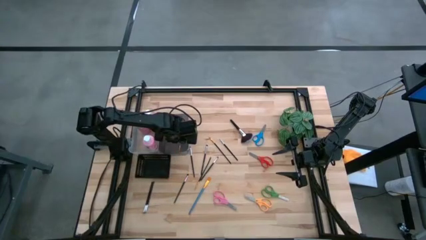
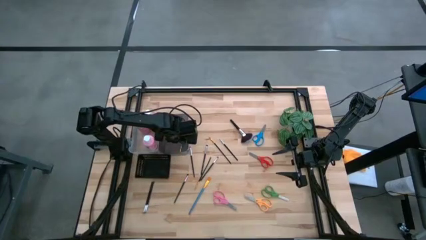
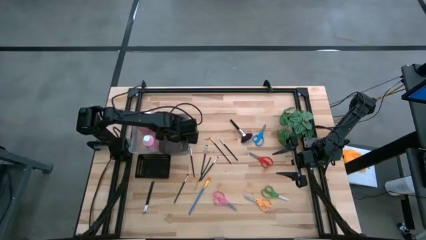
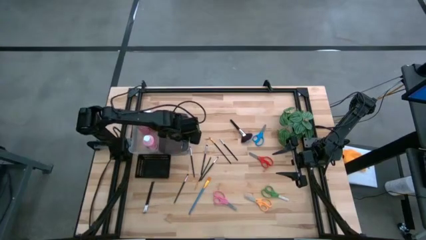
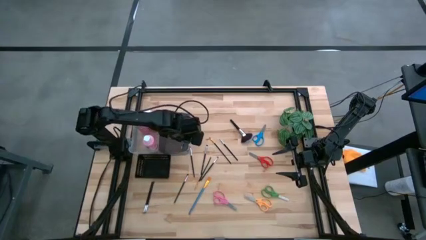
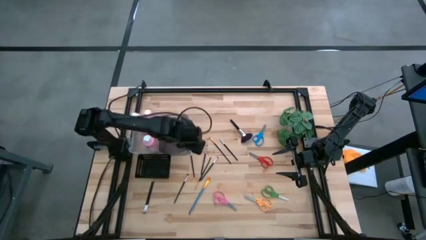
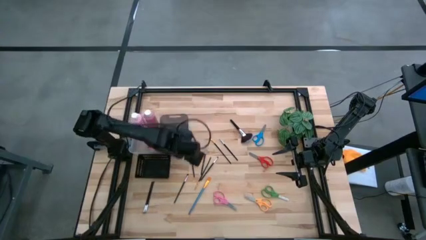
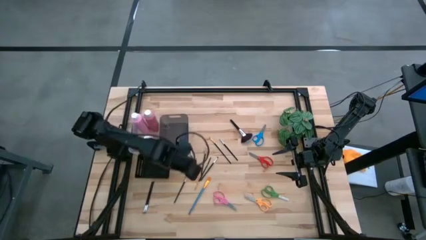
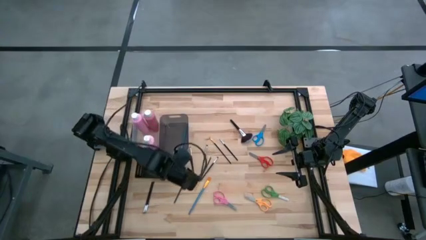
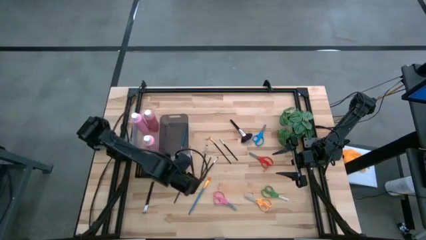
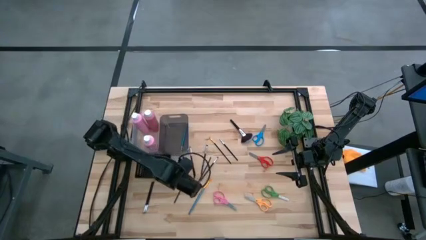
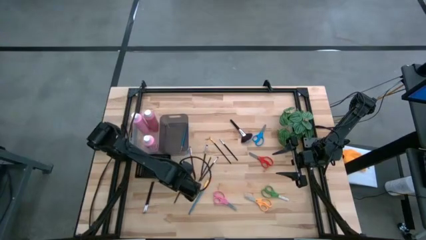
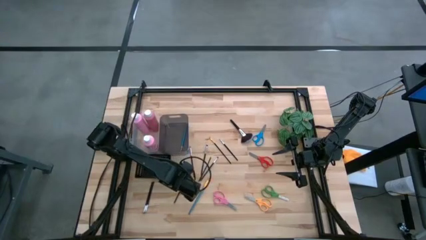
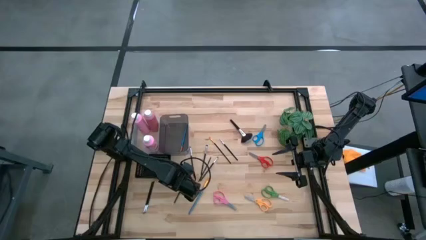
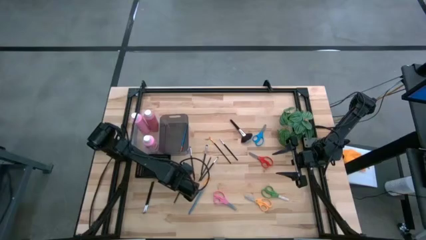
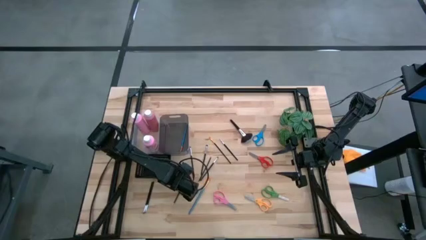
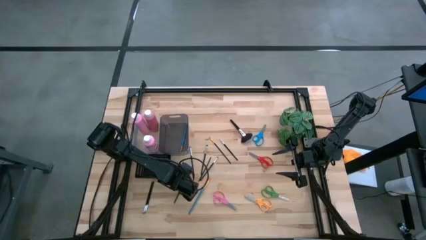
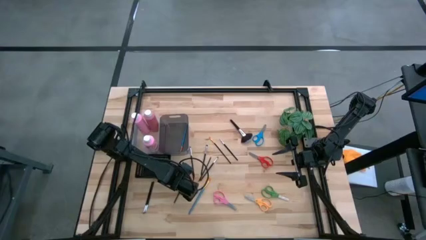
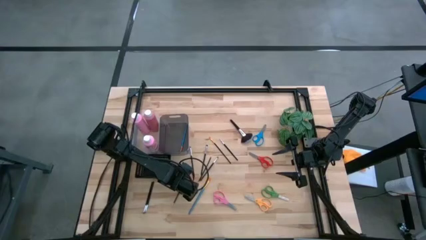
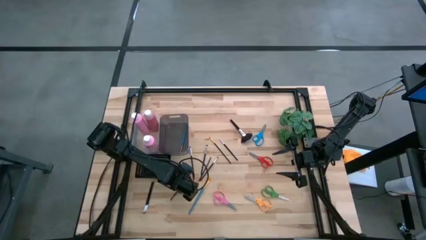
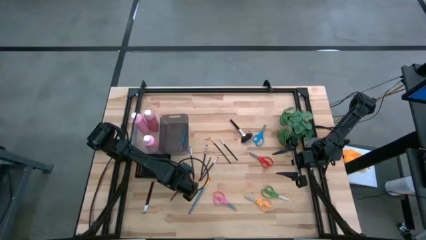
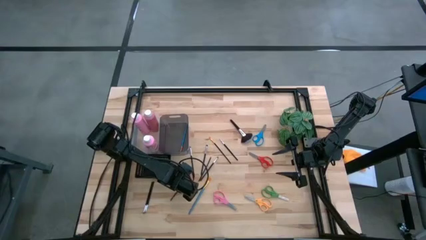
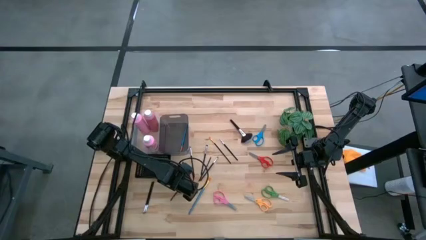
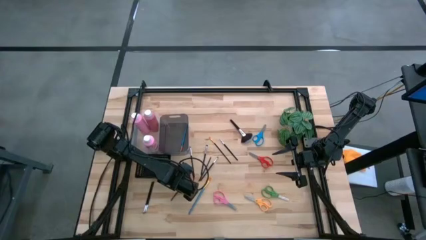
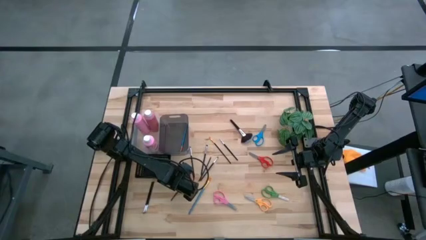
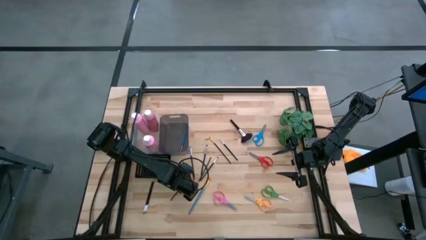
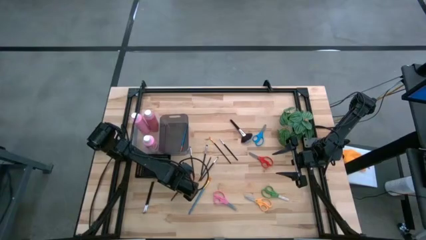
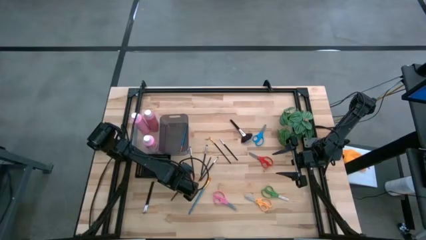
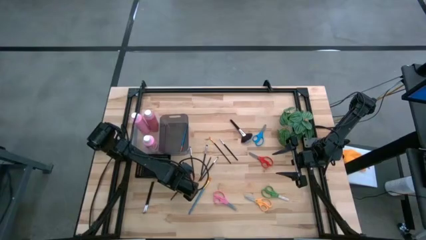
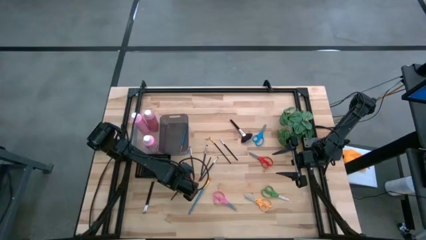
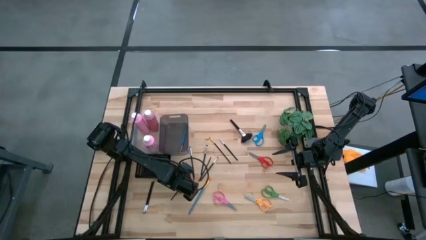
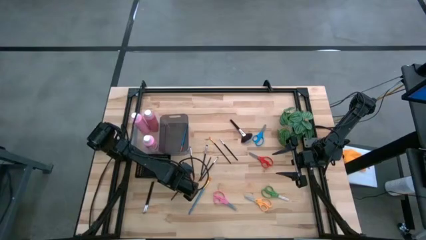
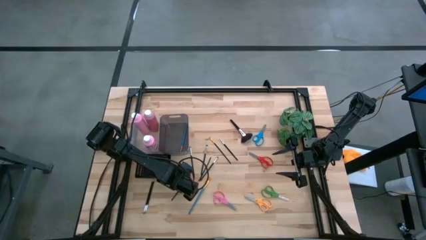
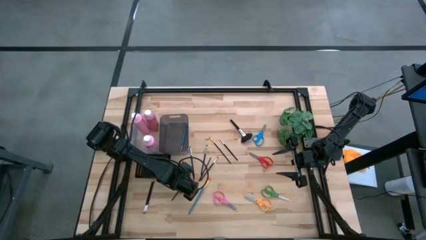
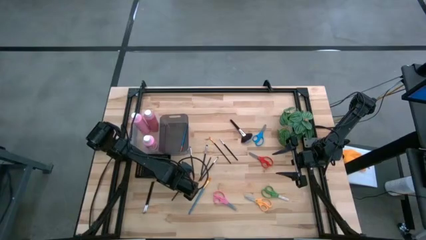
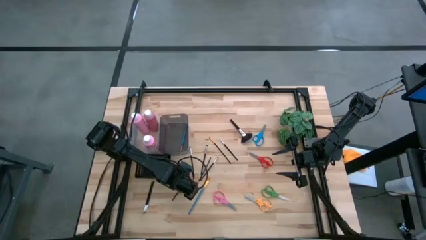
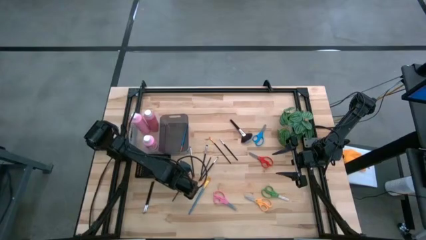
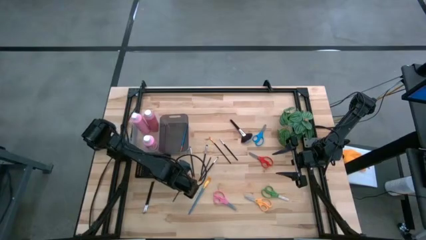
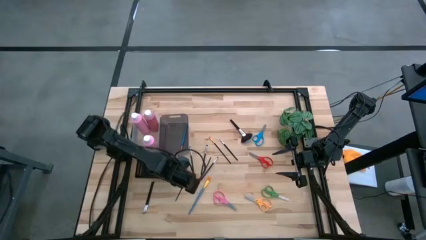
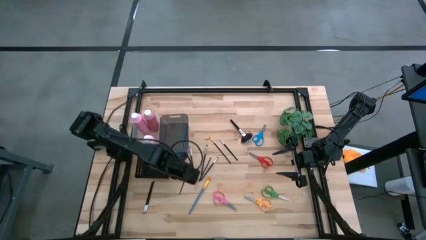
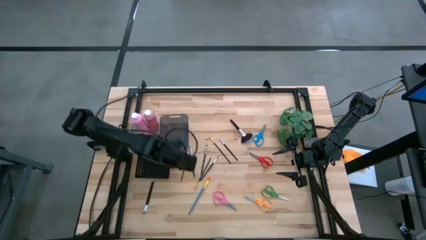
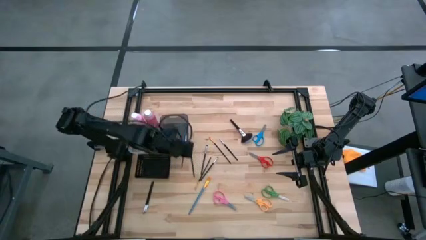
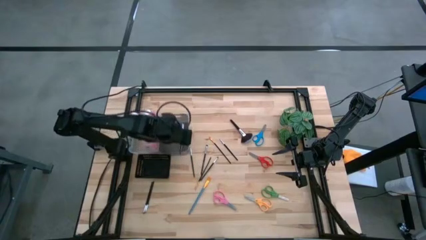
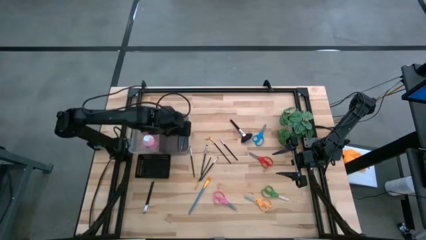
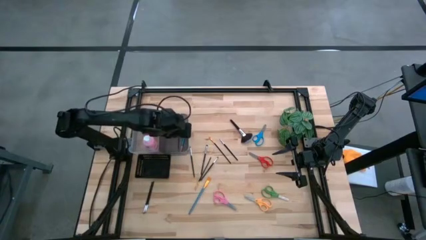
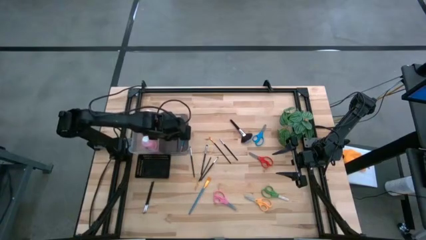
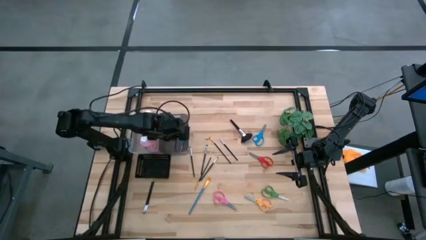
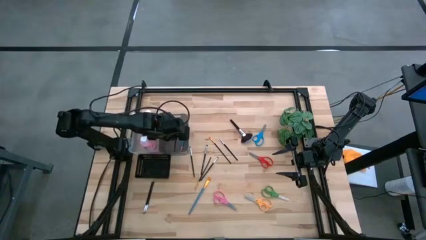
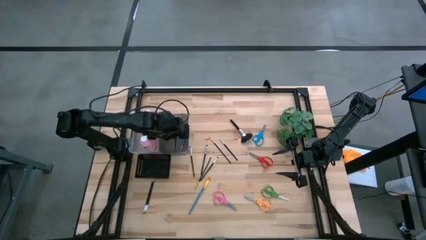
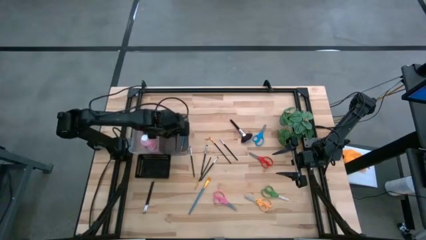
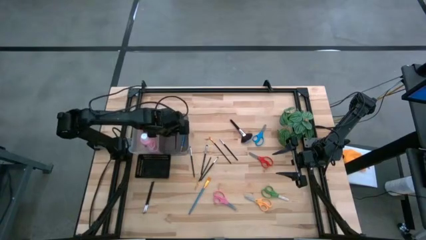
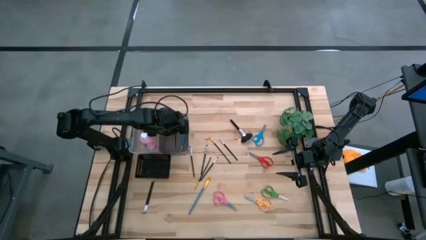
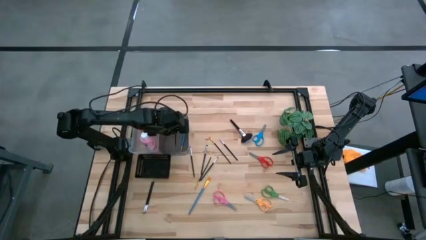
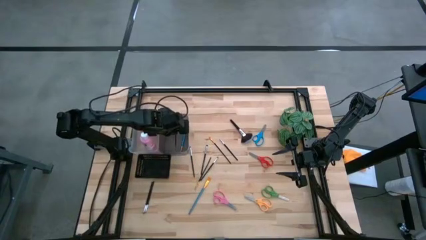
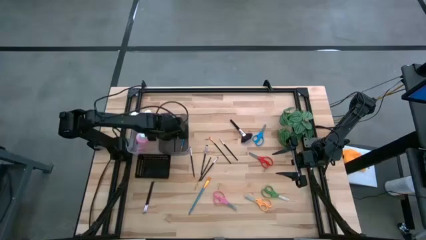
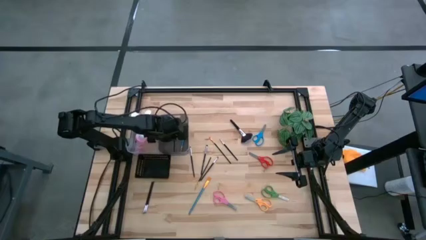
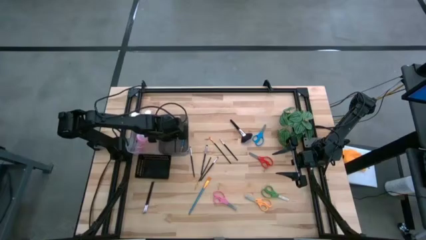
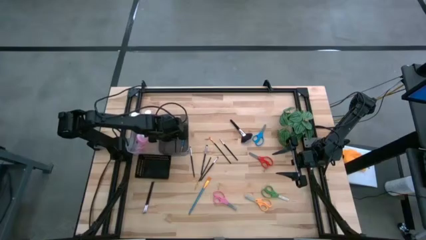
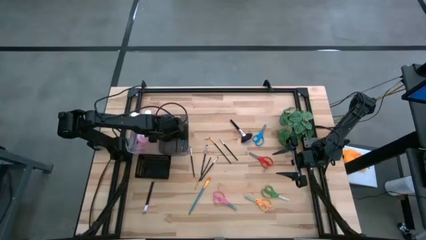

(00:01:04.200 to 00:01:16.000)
Task: Pick & Place Paint Supplies
Put the black brush into the black bin
